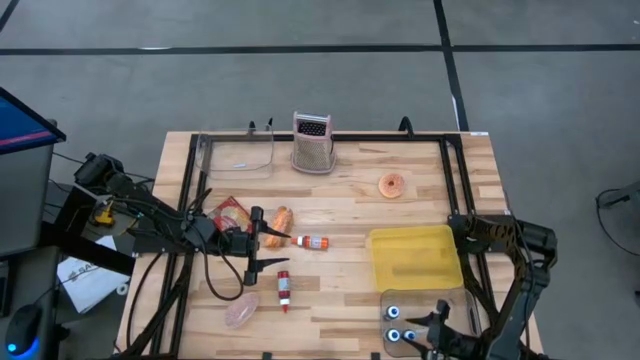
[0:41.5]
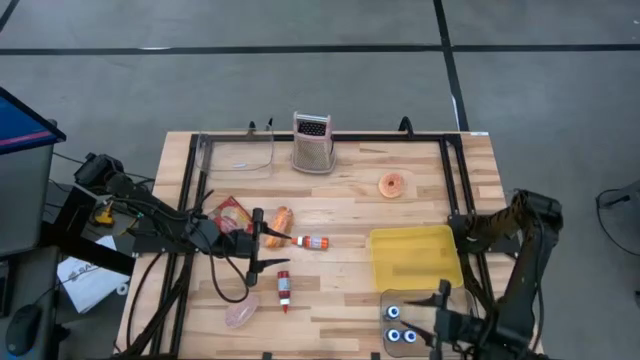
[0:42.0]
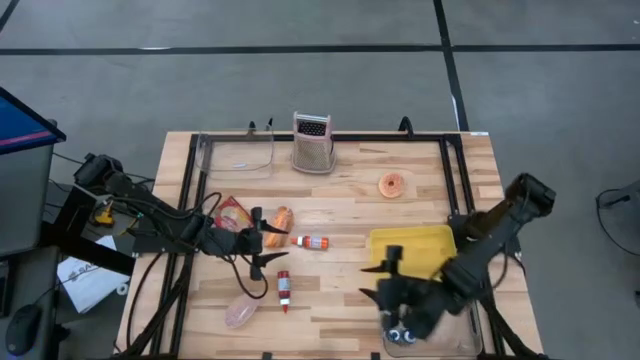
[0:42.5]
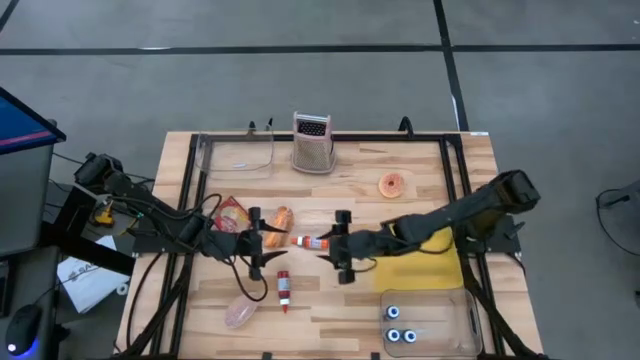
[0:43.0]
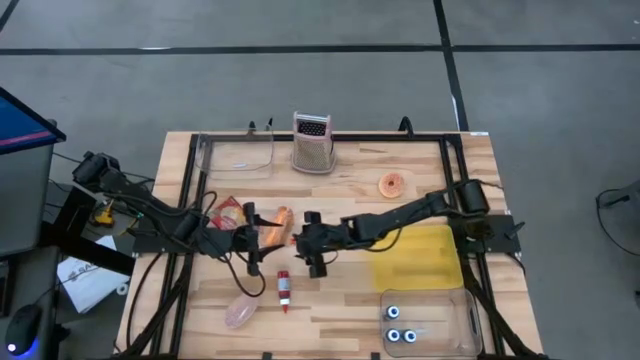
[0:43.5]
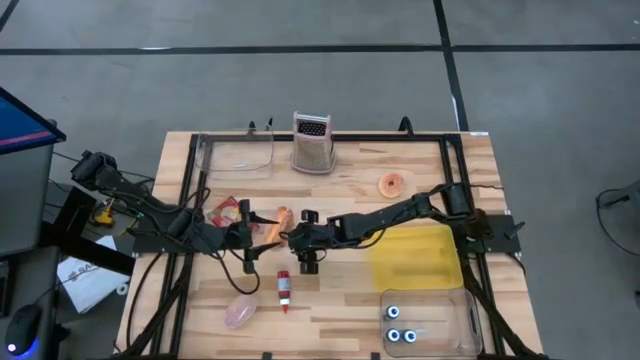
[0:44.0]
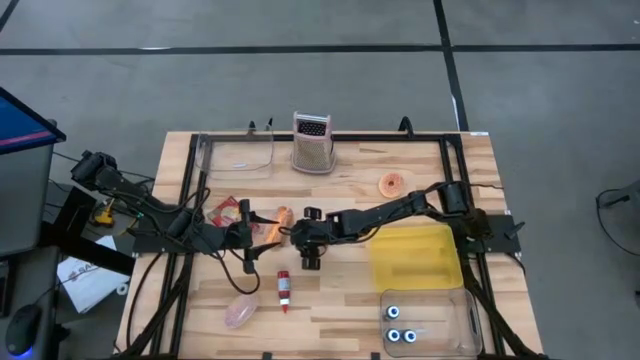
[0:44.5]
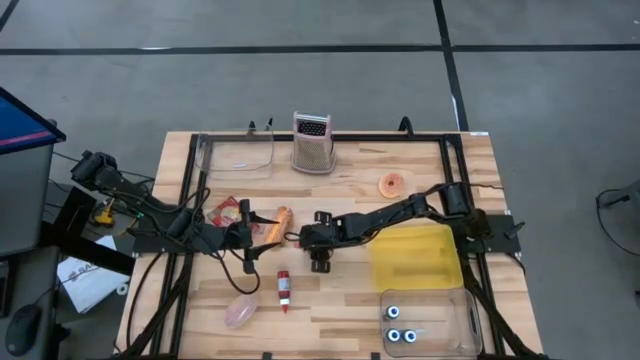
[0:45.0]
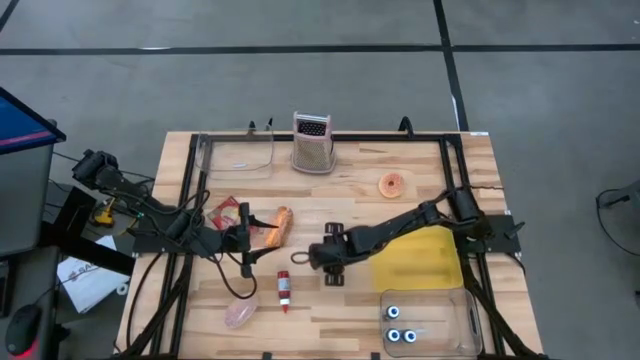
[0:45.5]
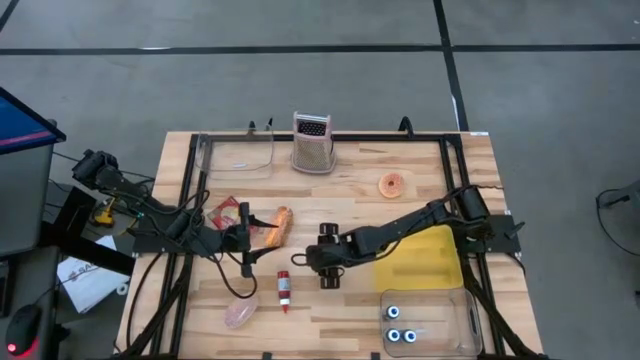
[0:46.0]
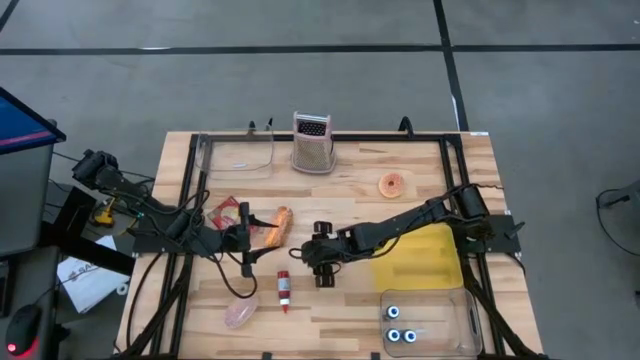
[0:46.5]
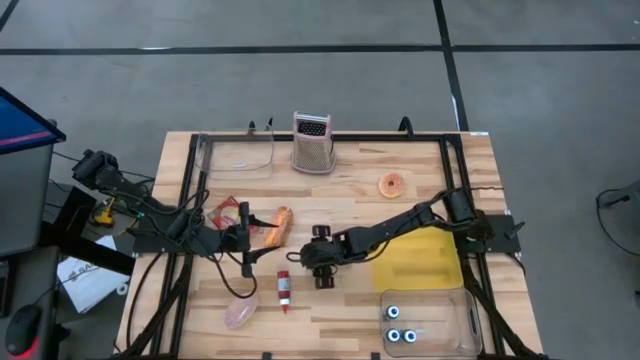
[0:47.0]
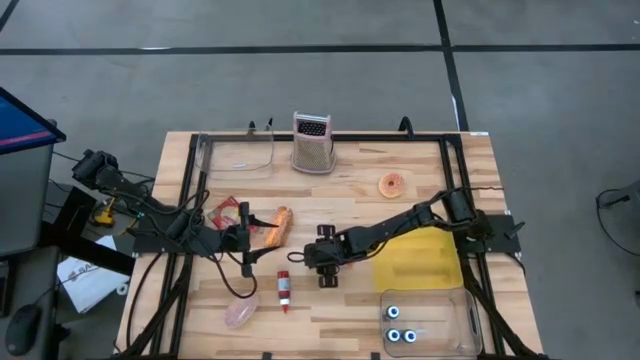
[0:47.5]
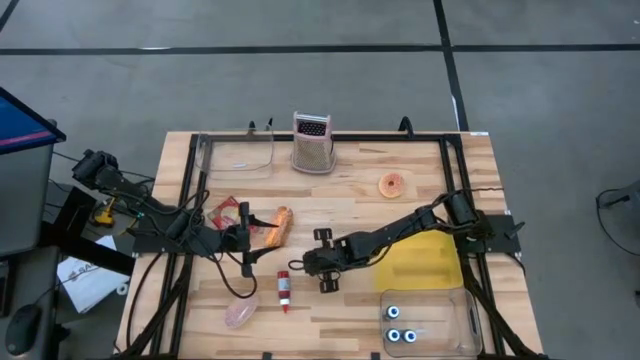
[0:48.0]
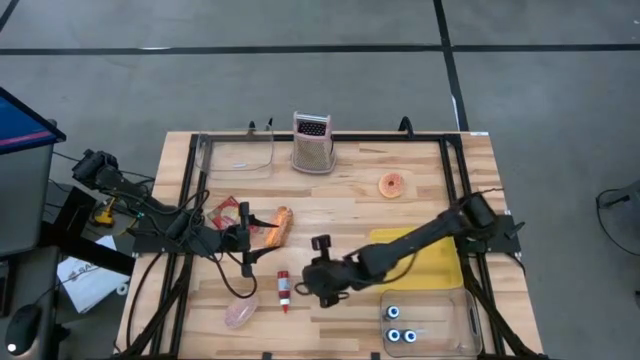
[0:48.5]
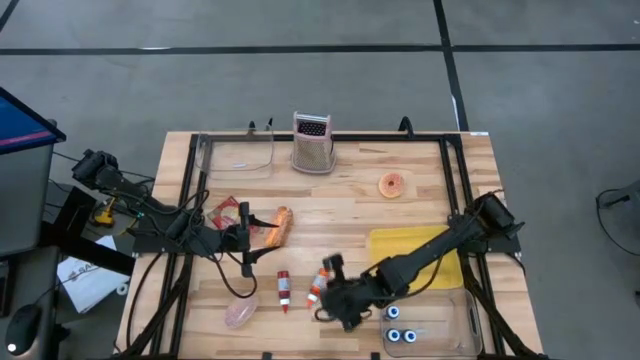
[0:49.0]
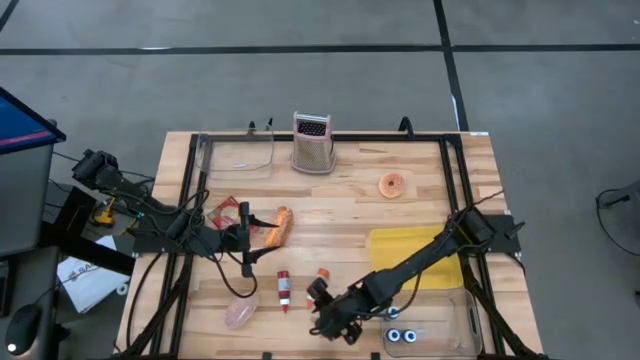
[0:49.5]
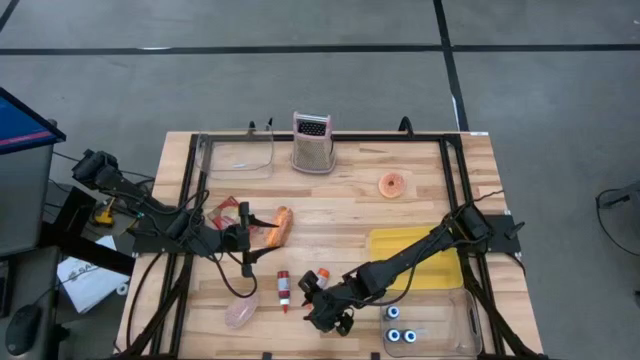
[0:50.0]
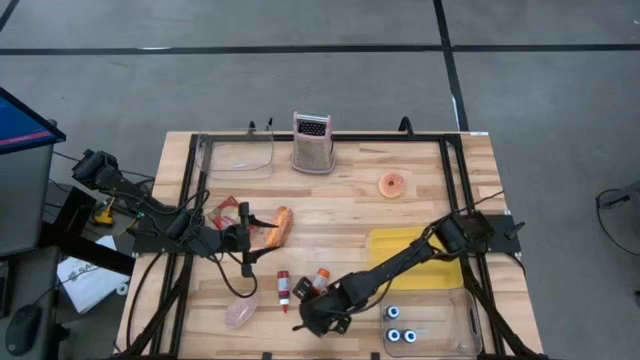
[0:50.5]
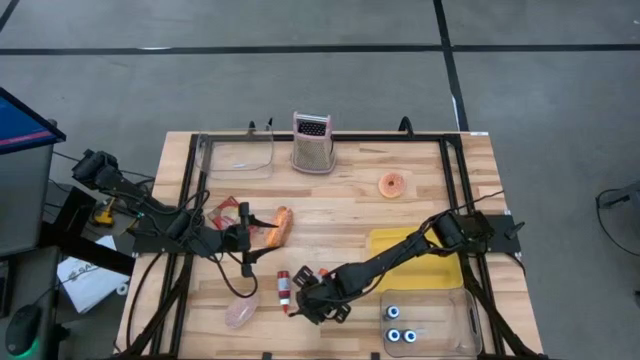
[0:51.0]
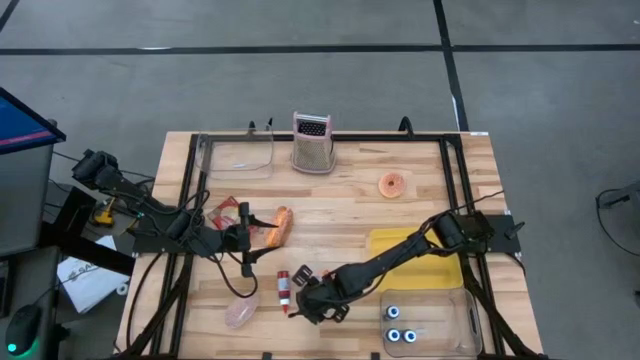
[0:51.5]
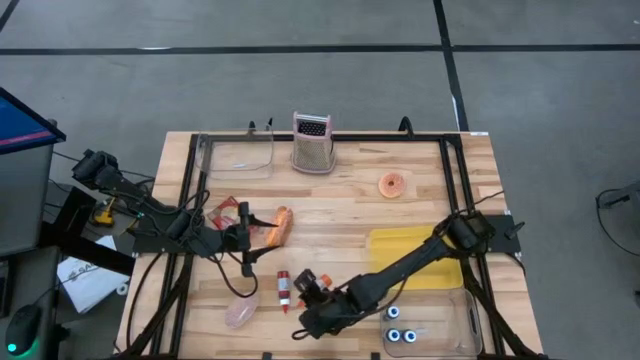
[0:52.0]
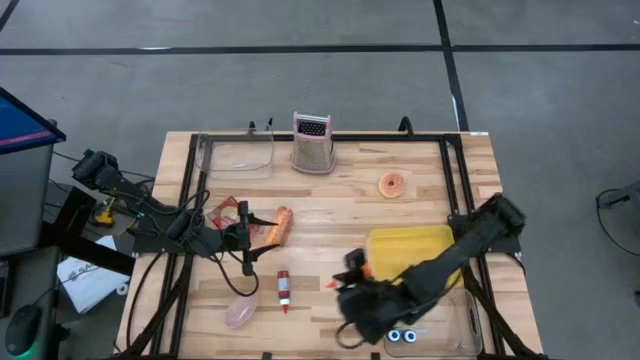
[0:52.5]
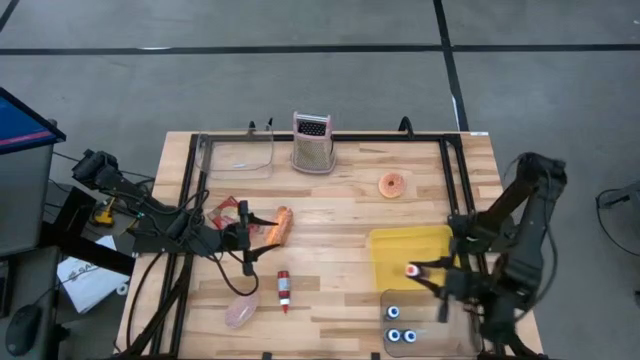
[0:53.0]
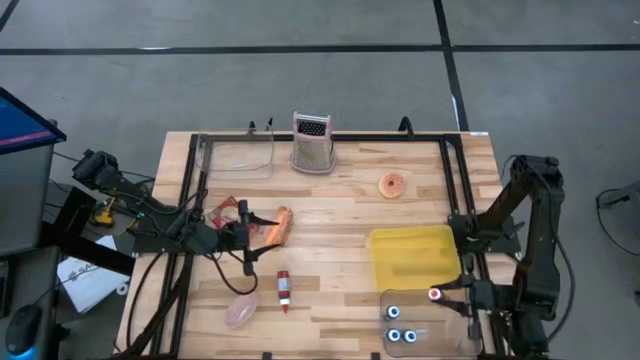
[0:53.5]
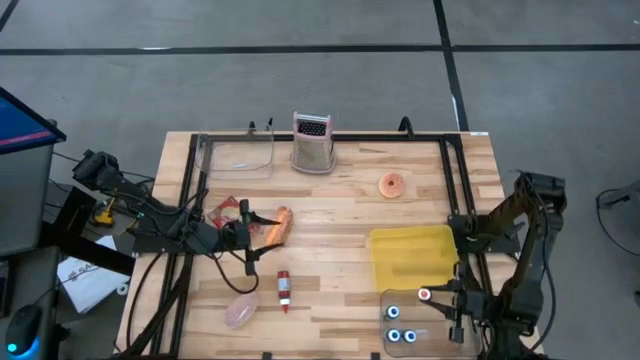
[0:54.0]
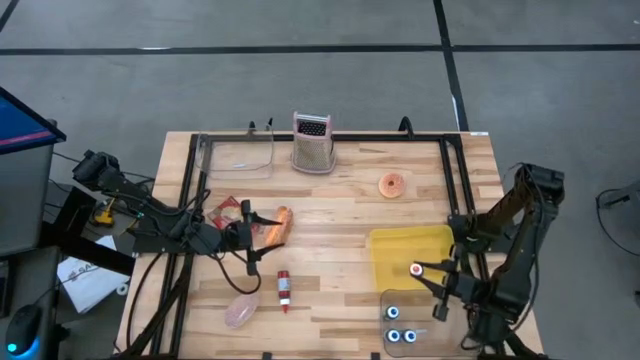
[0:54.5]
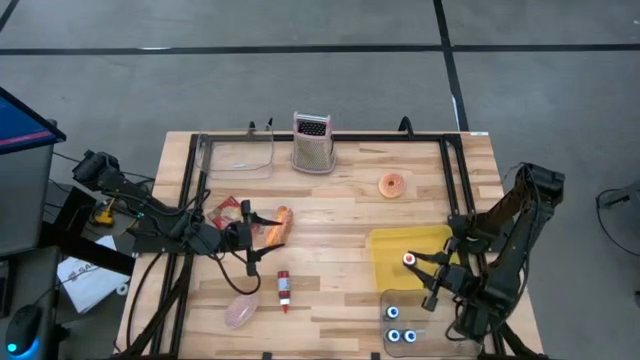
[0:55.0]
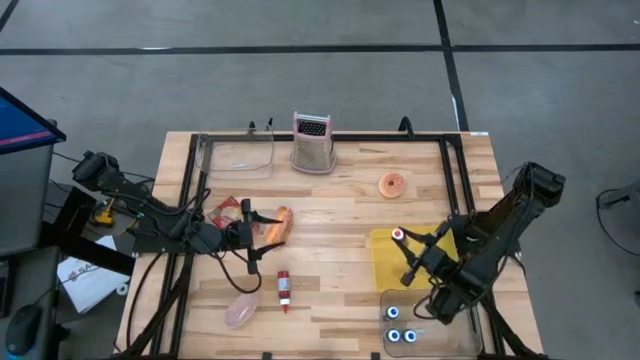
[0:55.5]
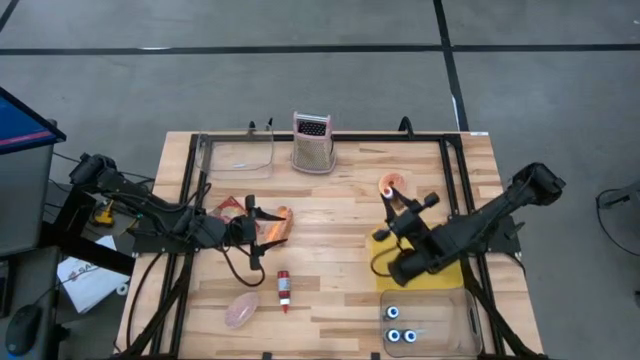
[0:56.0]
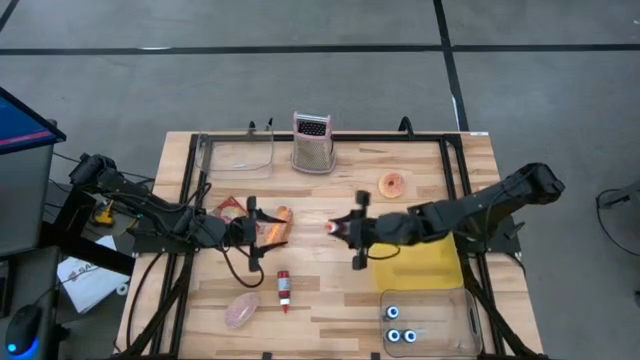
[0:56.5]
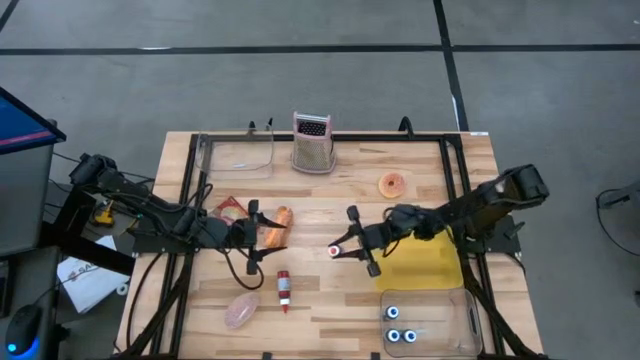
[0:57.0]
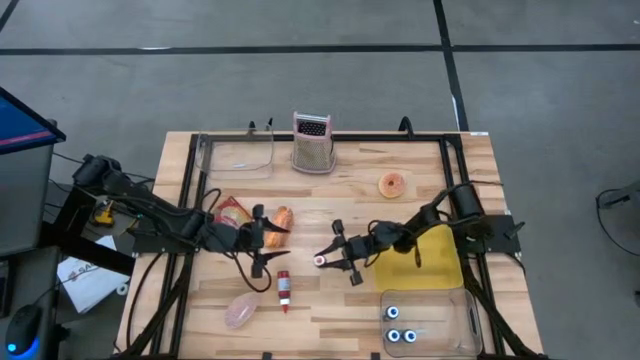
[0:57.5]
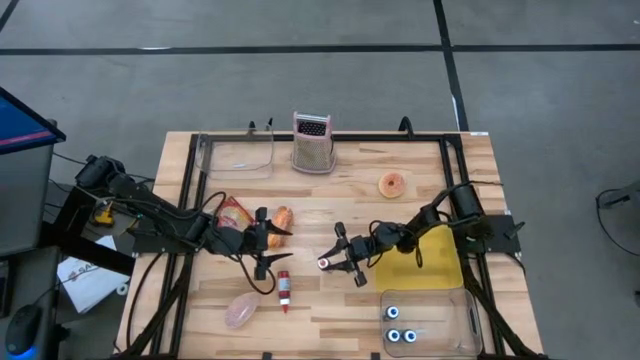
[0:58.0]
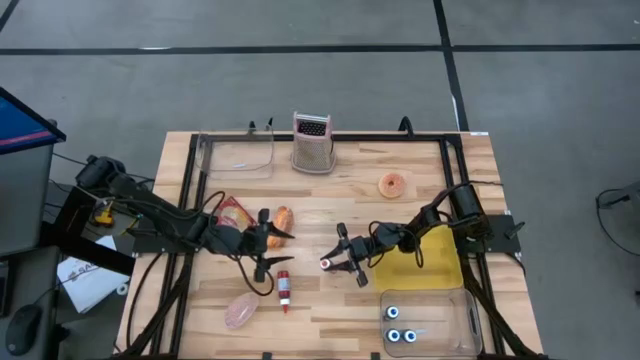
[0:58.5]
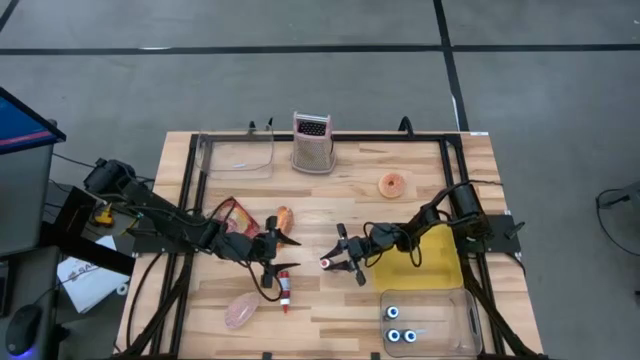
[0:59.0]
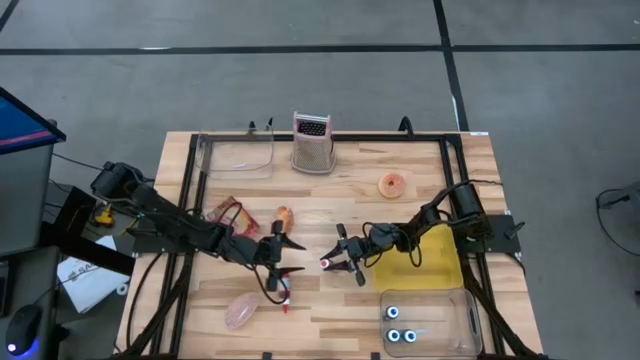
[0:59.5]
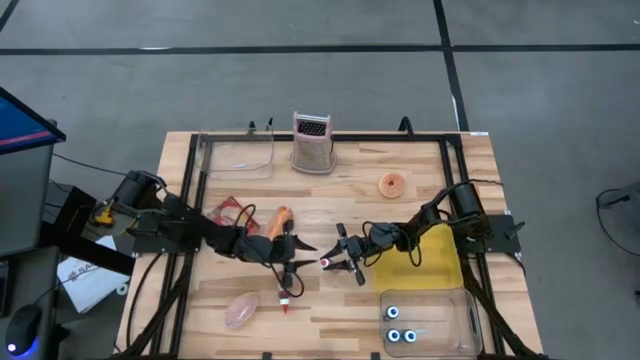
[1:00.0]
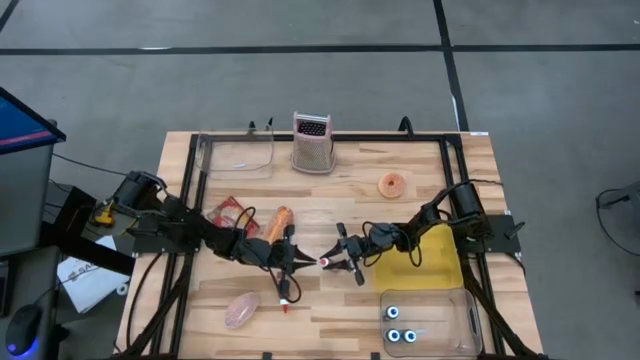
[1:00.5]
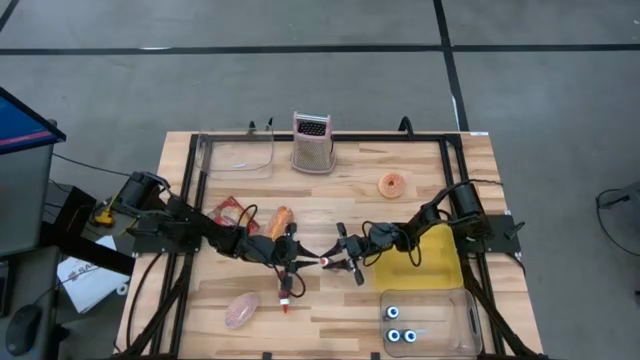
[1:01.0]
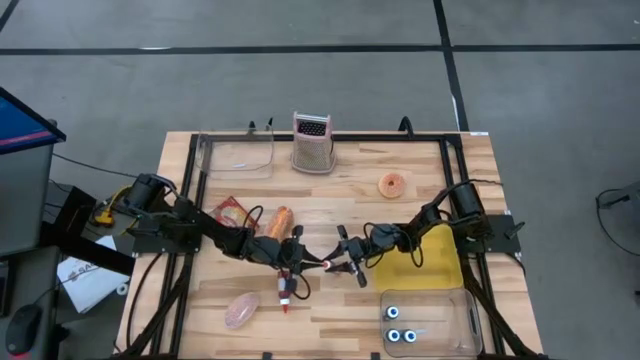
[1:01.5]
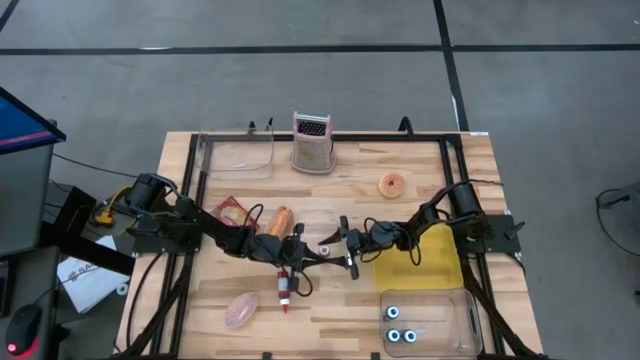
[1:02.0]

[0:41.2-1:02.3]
Task: Pick & Place Food Item
Put the orange food coloring bottle into the bottom transparent bin
